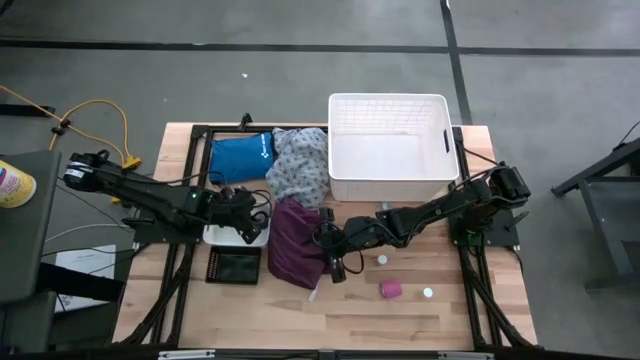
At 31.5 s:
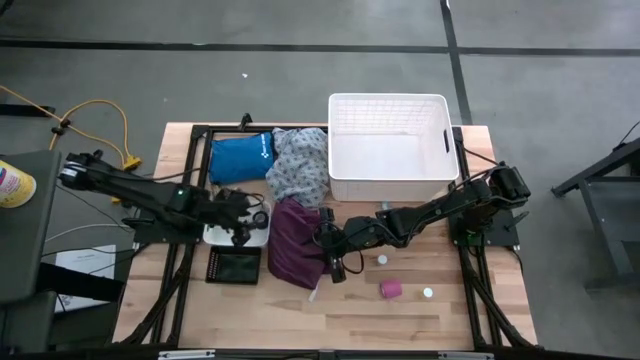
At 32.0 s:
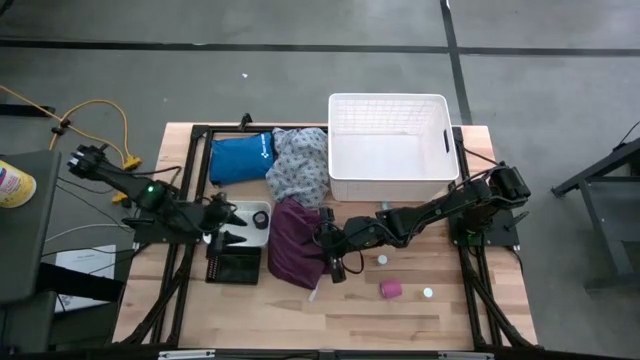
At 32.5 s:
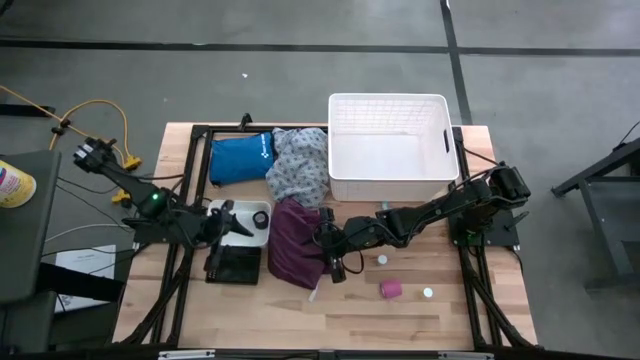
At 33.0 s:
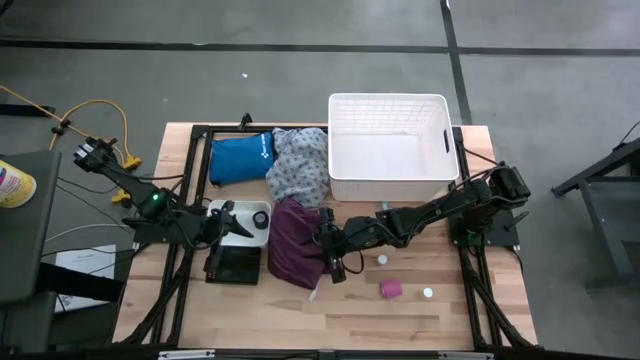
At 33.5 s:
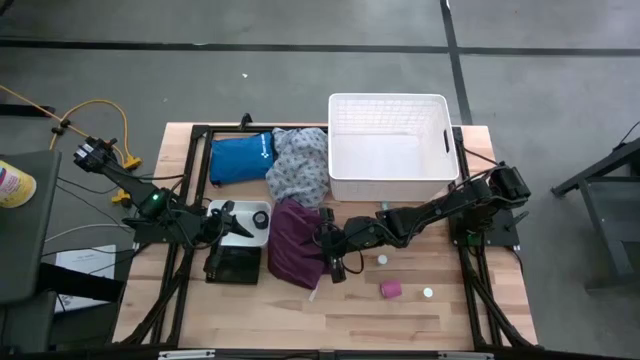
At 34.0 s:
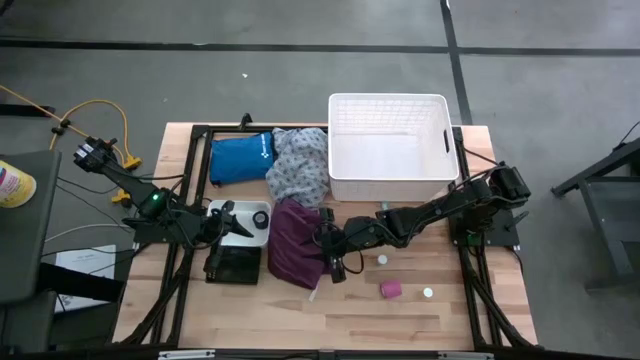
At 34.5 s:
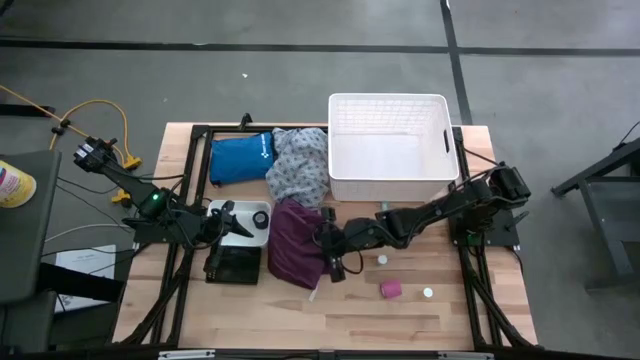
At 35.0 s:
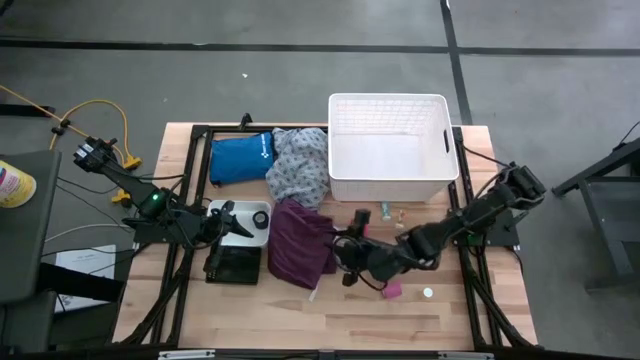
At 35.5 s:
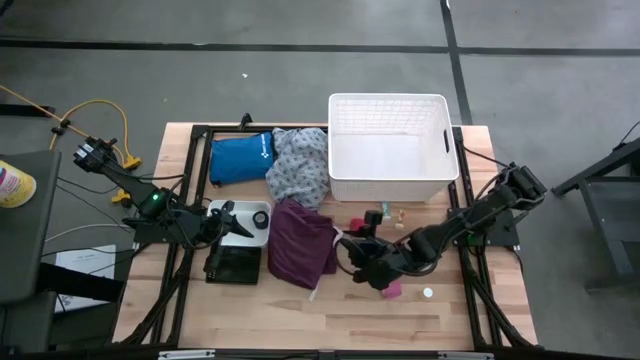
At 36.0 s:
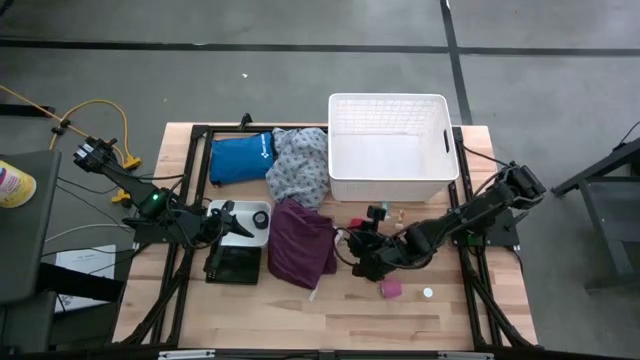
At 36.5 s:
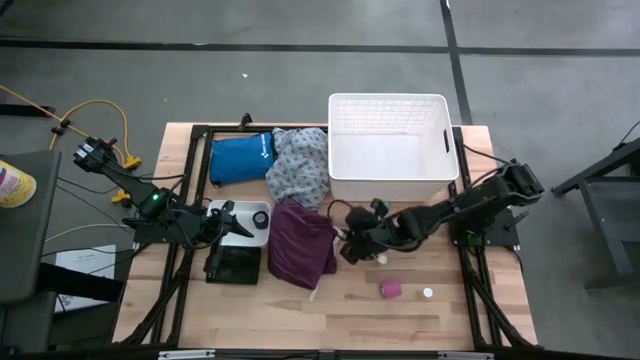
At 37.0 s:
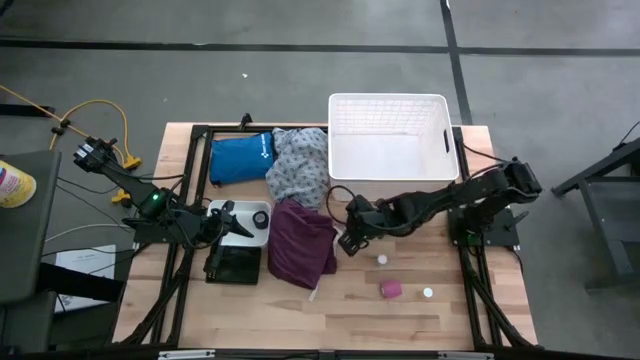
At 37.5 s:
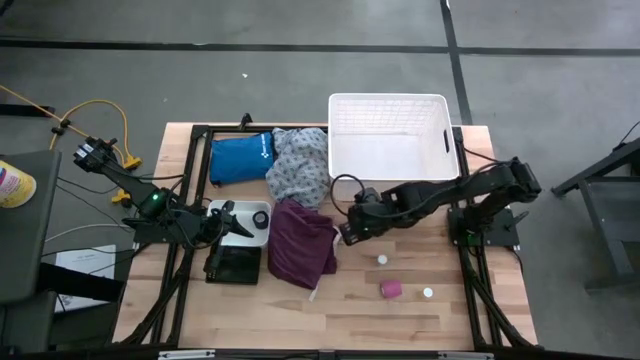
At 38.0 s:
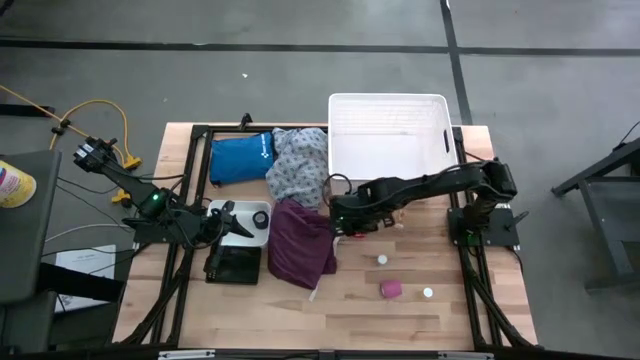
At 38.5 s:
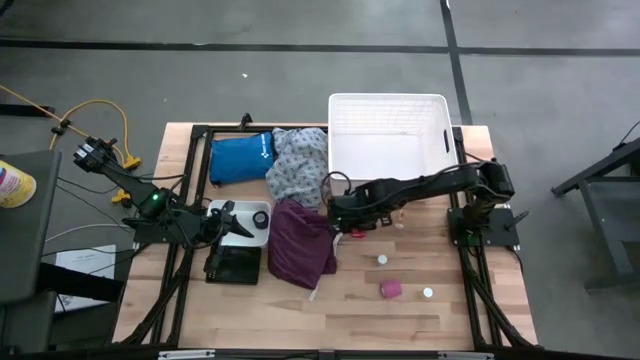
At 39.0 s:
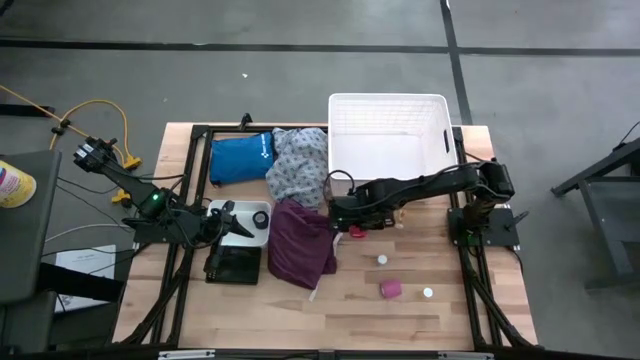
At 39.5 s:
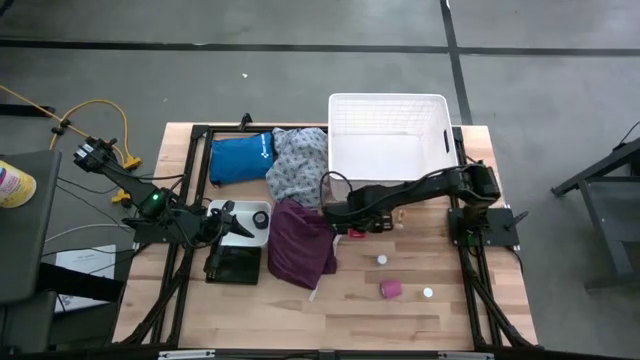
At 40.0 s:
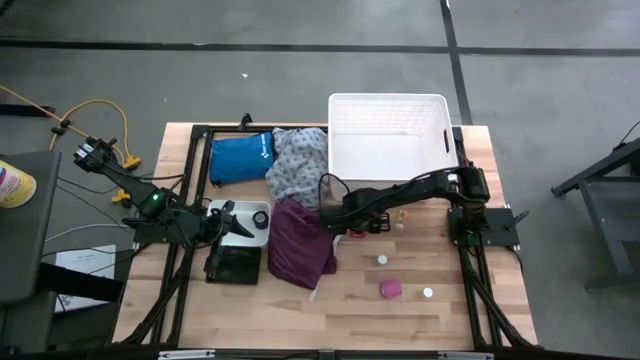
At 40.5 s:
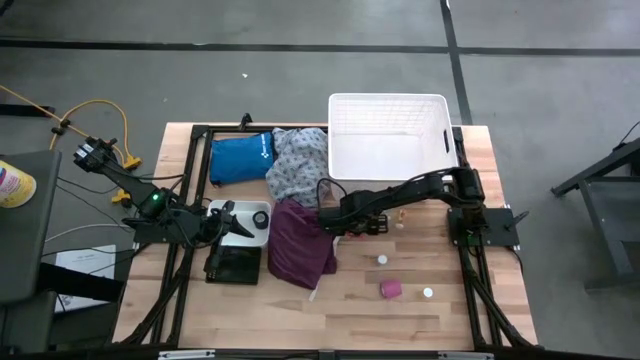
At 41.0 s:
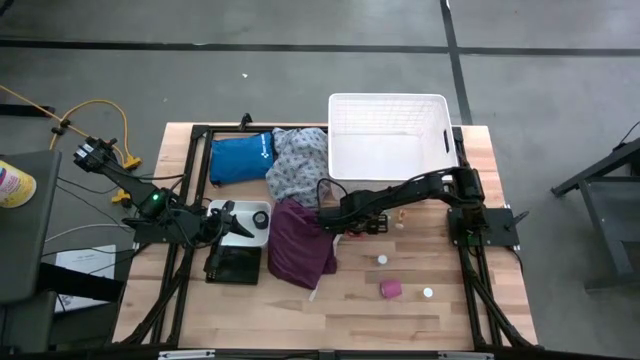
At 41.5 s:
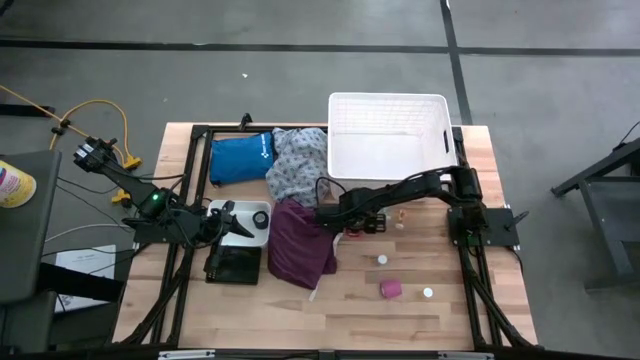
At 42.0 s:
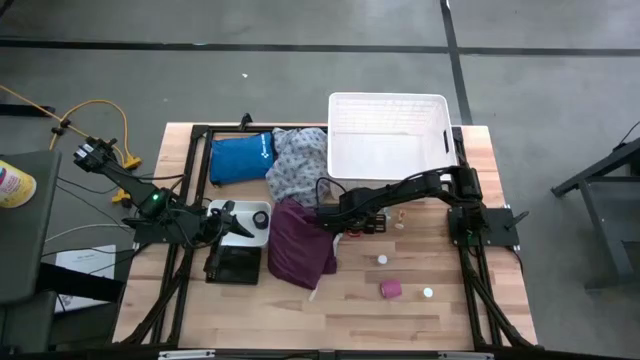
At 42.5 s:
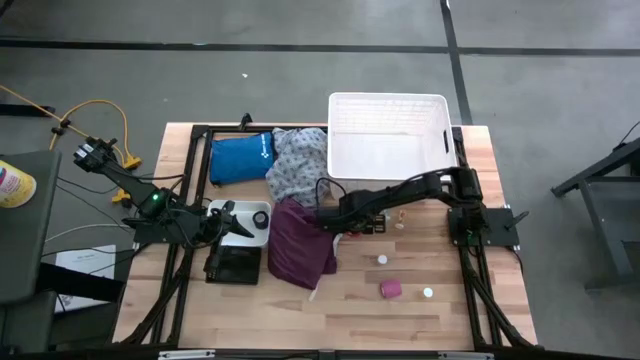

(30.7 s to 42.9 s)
Task: Pick & place medical supplies in basket/bin
Put the red bandage into the white bin

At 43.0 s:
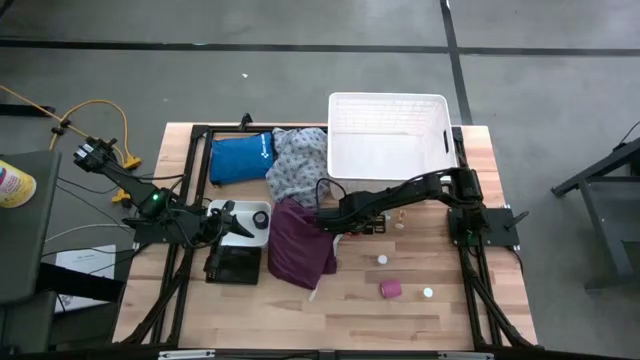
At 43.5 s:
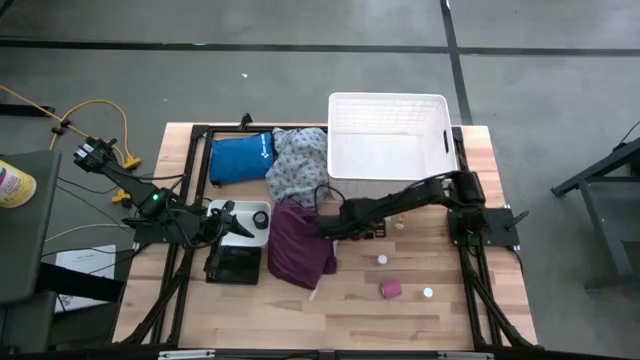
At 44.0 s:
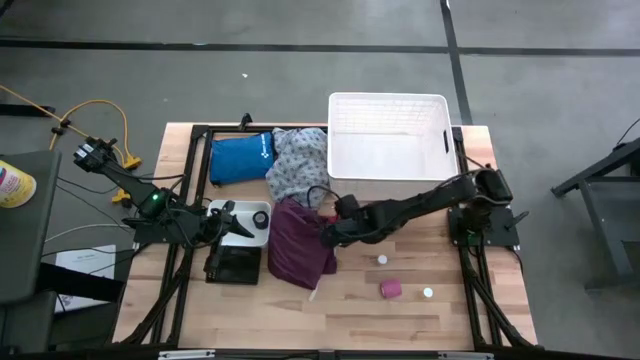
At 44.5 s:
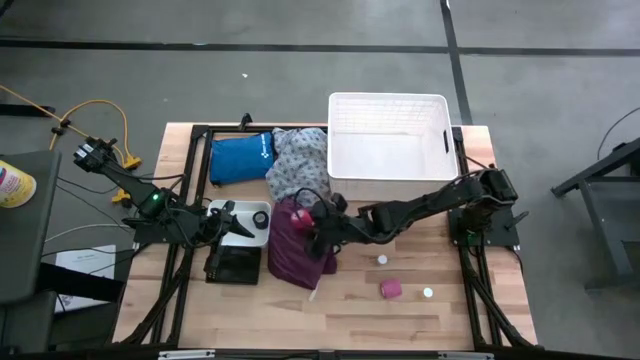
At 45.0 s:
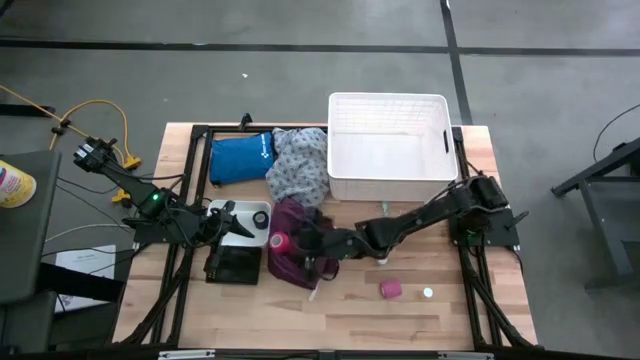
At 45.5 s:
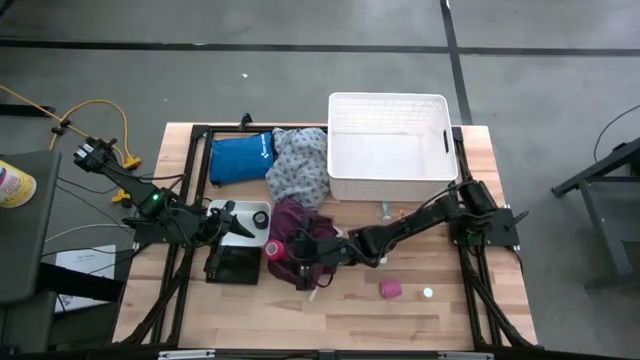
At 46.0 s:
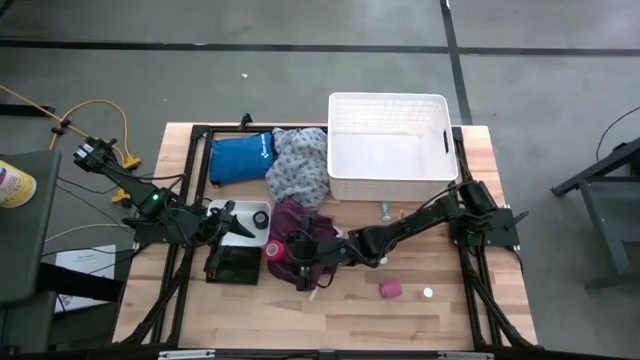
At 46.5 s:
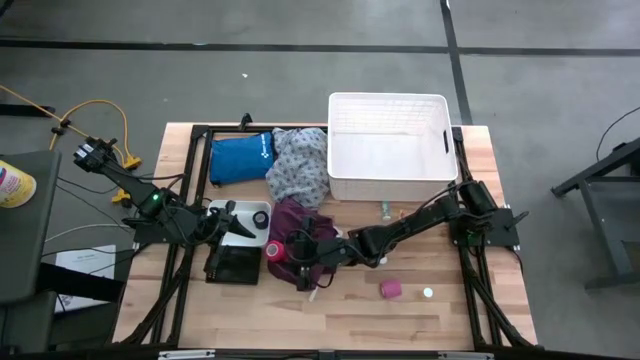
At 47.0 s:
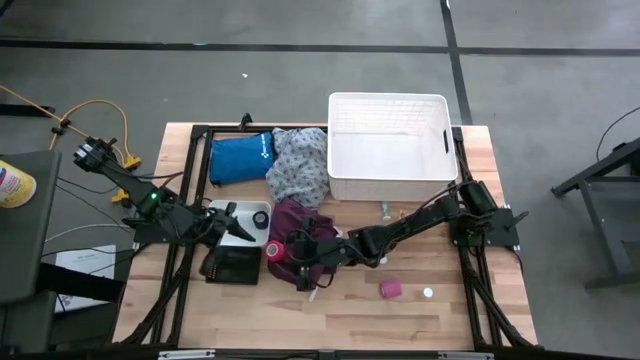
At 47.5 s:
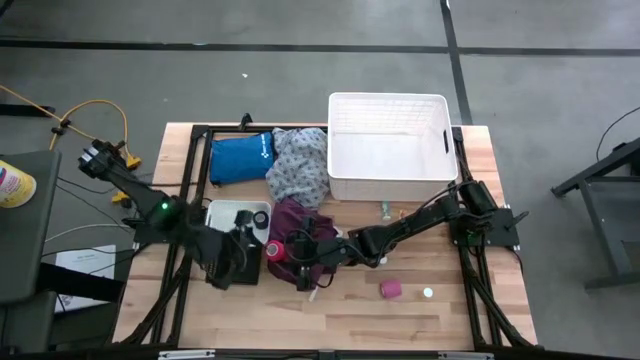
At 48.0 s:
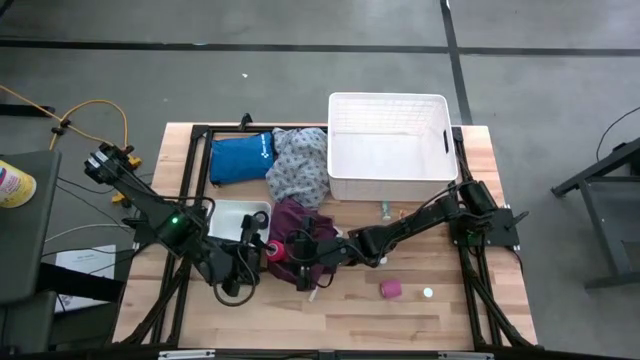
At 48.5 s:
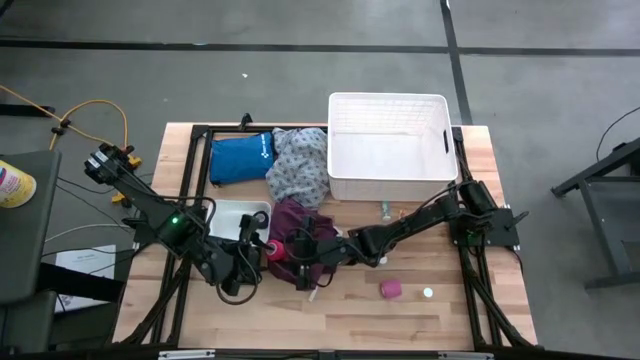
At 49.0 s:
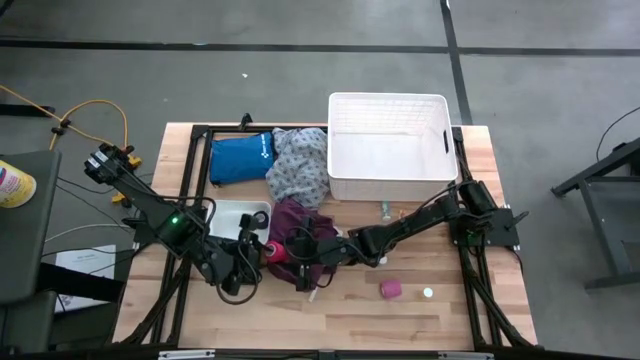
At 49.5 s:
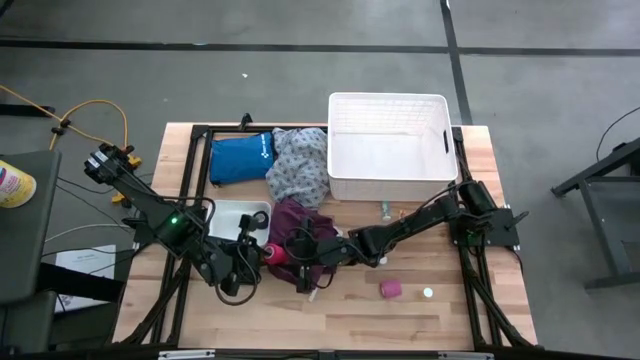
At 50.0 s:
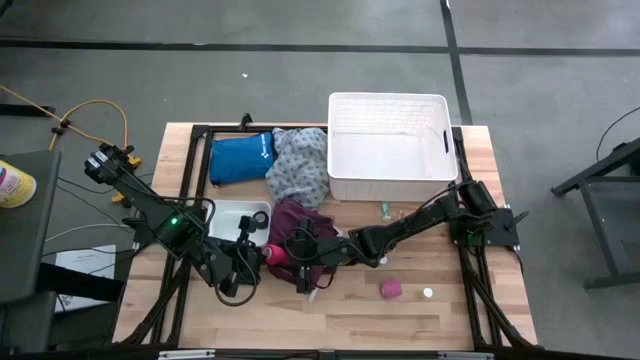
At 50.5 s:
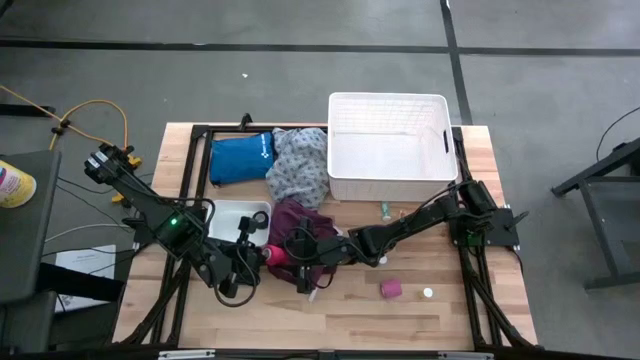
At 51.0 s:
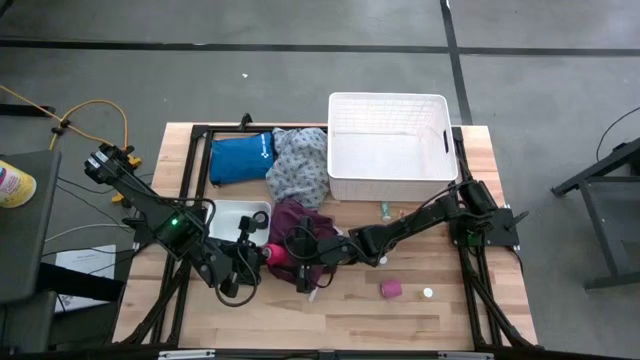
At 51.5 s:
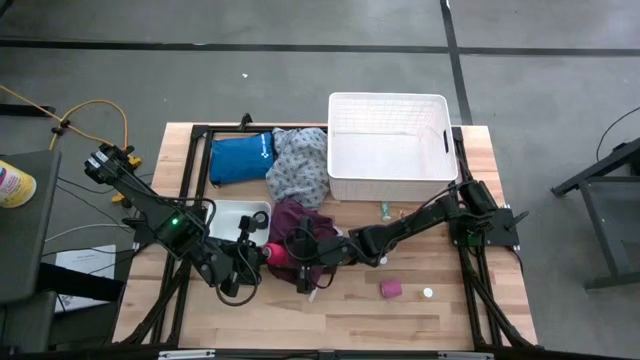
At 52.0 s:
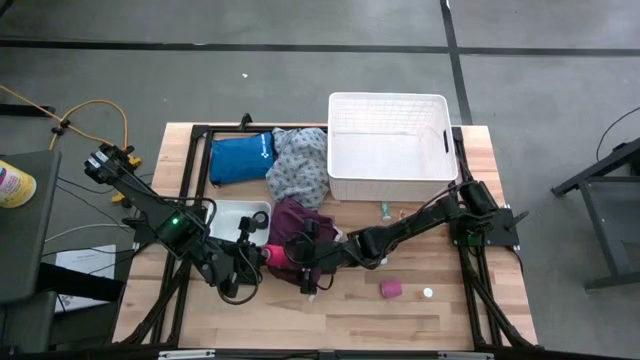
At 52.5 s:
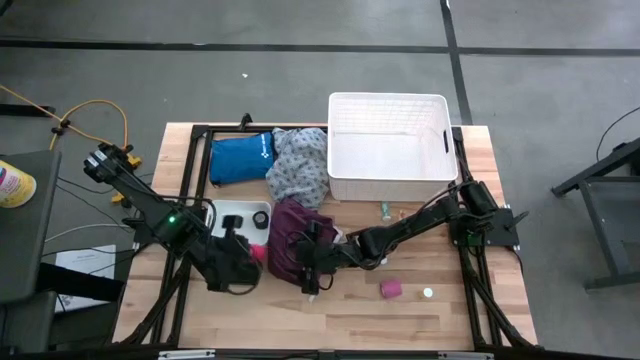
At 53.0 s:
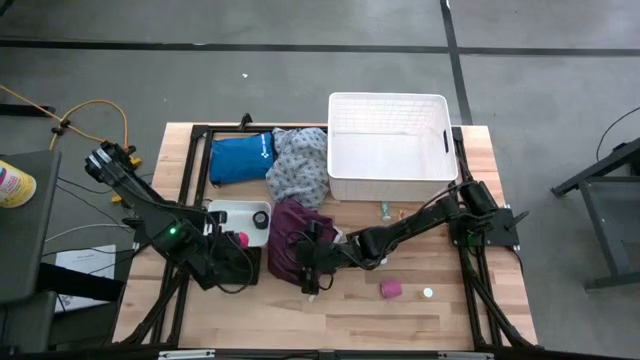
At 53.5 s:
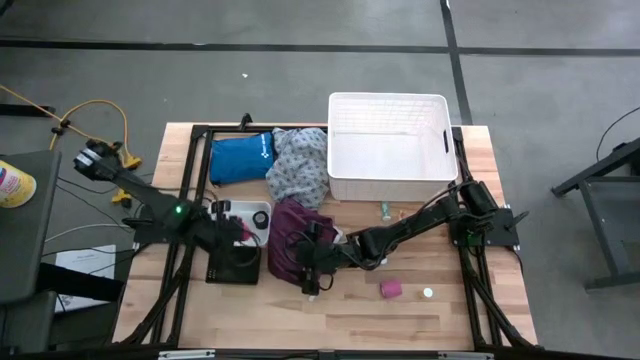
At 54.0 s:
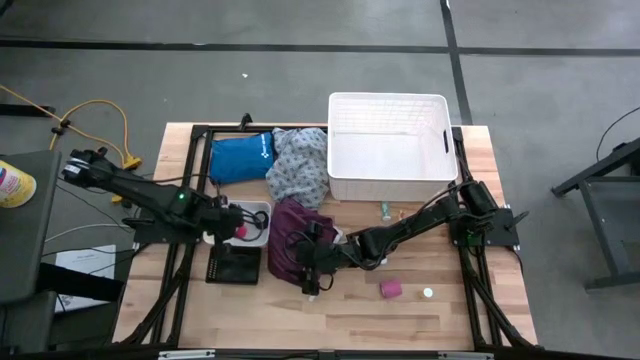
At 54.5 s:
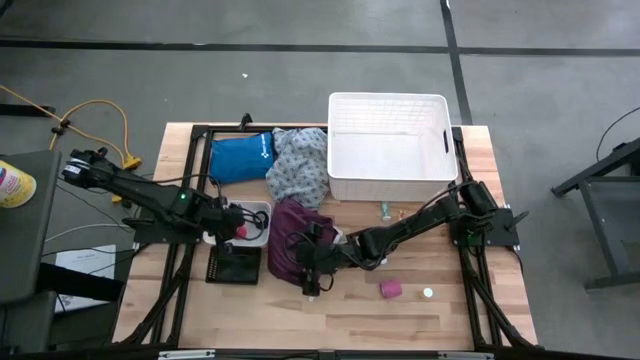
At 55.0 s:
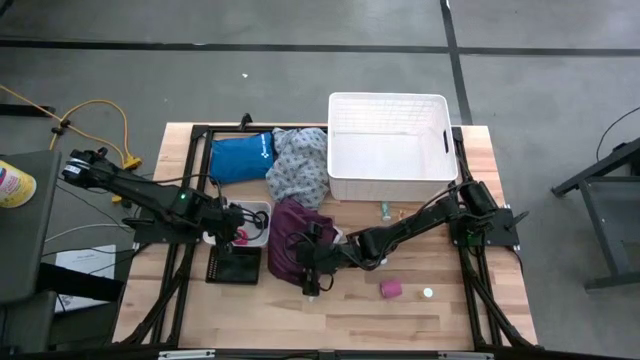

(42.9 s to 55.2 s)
Put the red bandage into the white bin
